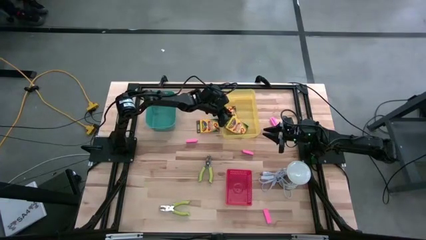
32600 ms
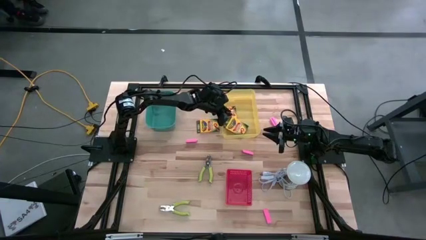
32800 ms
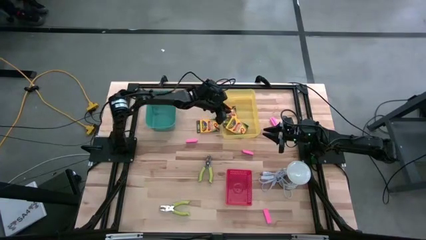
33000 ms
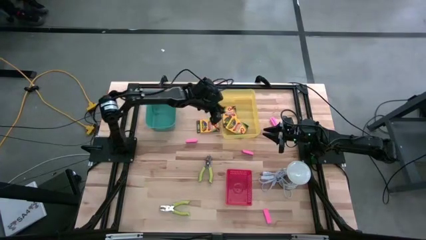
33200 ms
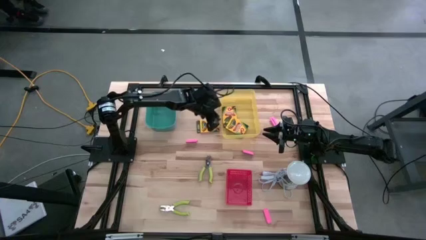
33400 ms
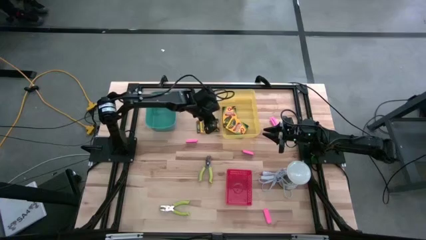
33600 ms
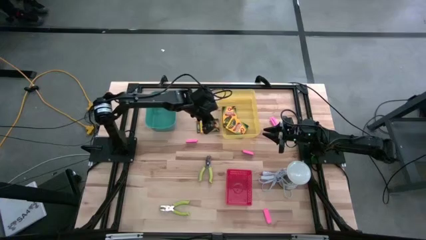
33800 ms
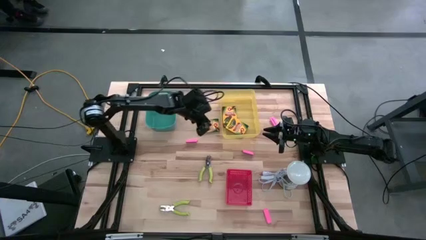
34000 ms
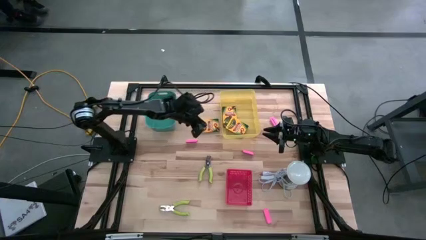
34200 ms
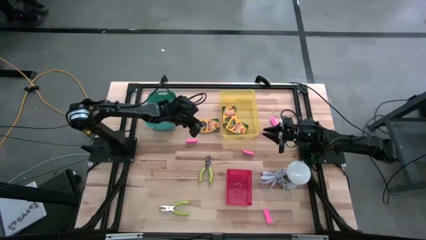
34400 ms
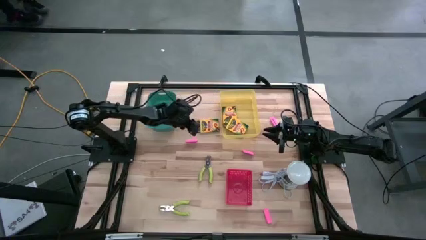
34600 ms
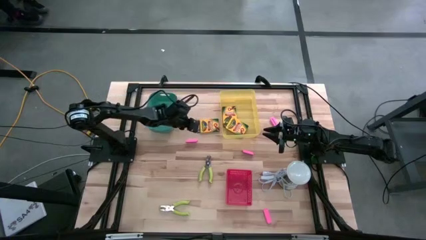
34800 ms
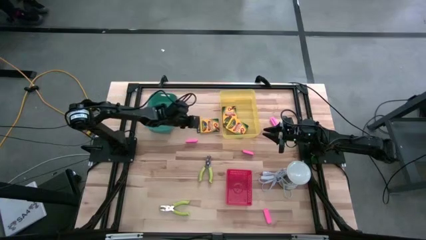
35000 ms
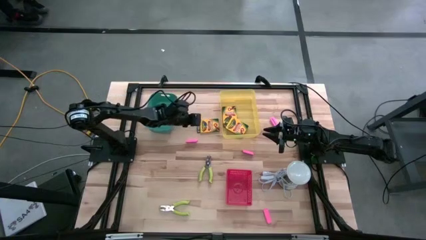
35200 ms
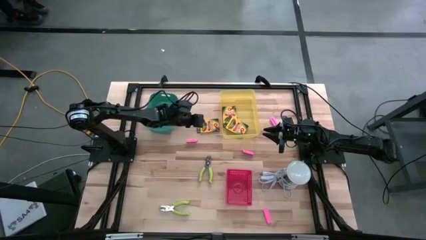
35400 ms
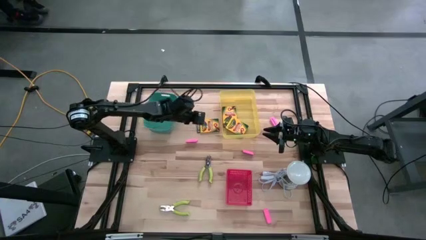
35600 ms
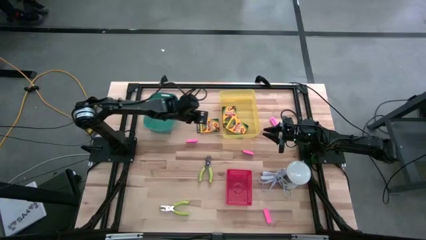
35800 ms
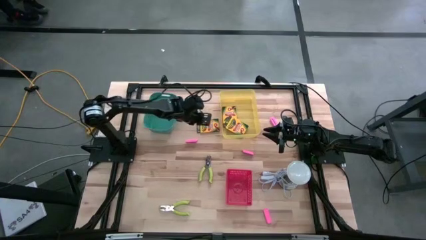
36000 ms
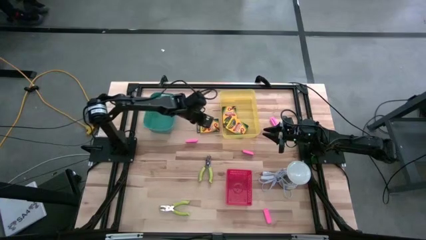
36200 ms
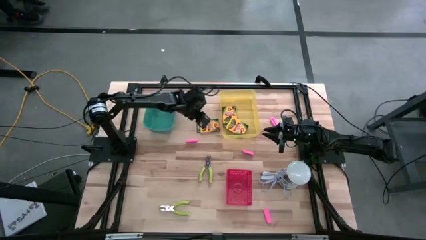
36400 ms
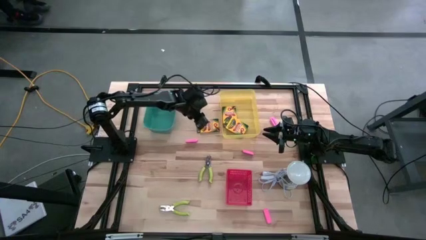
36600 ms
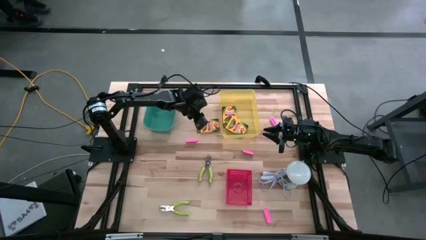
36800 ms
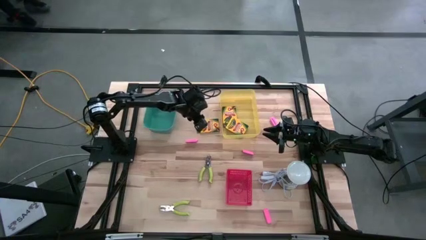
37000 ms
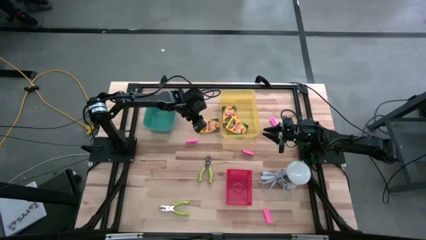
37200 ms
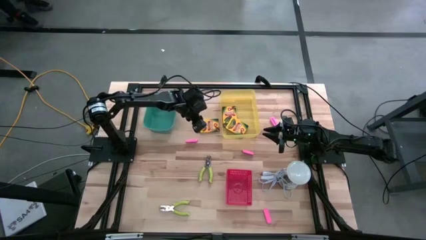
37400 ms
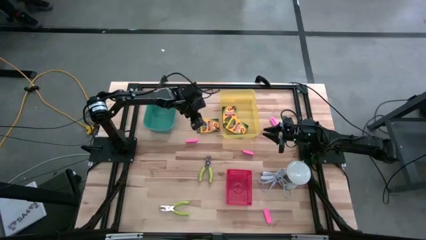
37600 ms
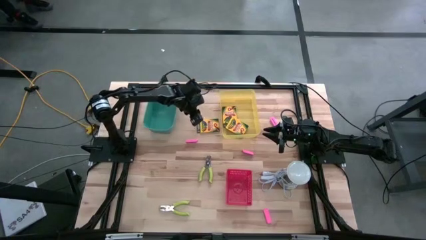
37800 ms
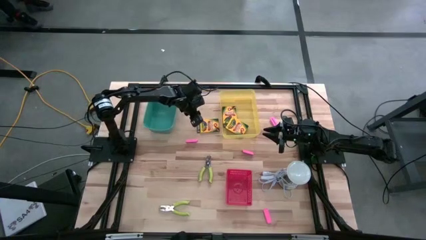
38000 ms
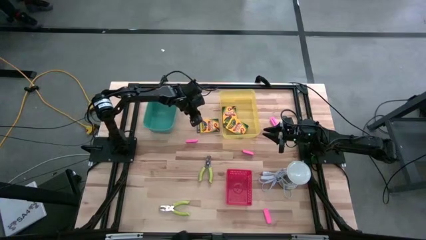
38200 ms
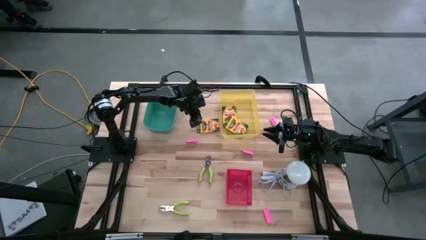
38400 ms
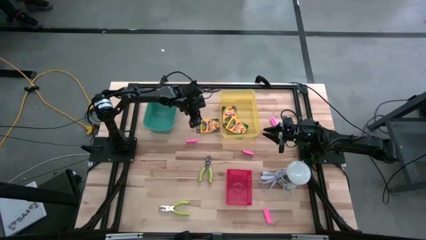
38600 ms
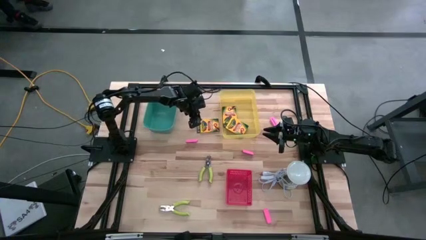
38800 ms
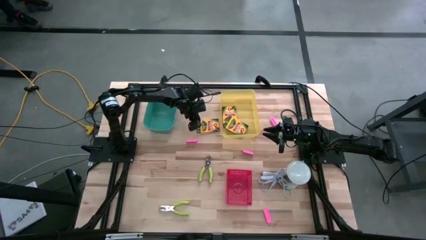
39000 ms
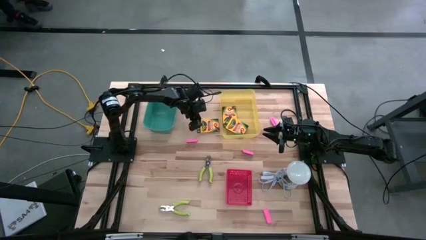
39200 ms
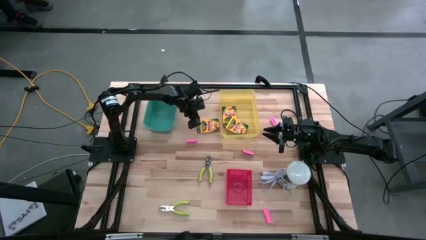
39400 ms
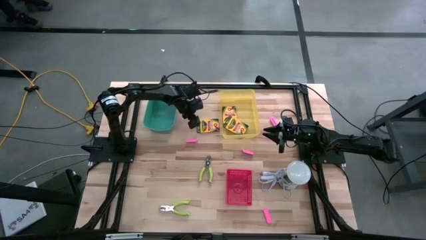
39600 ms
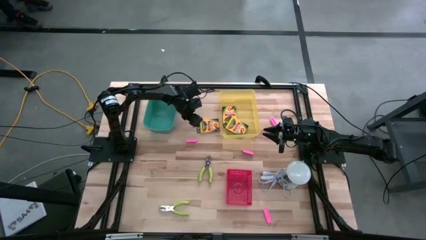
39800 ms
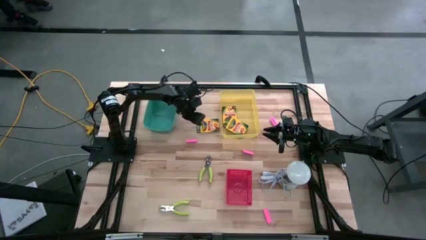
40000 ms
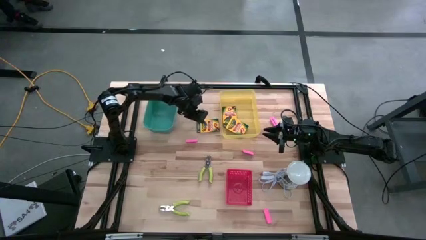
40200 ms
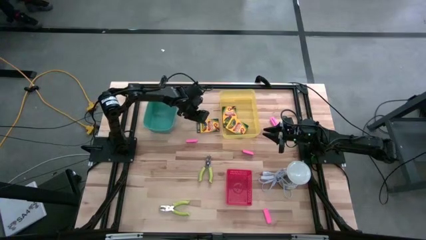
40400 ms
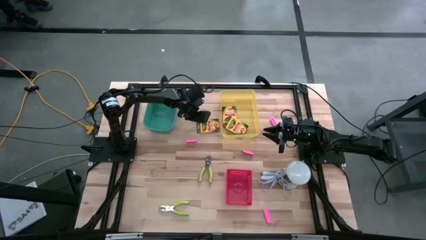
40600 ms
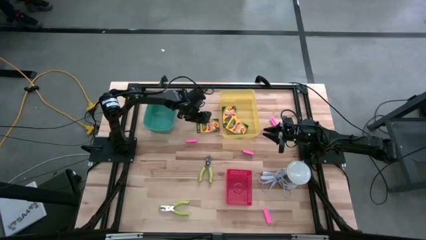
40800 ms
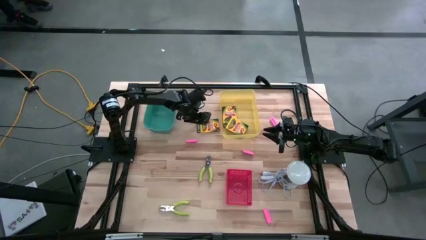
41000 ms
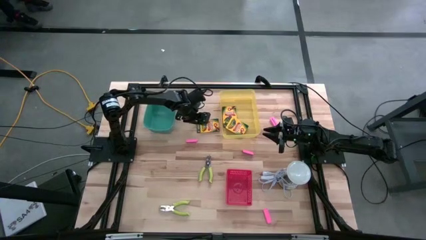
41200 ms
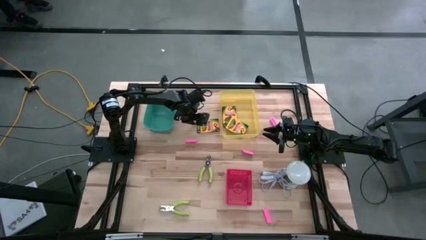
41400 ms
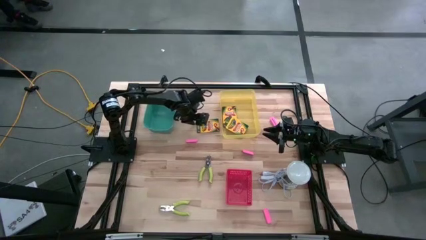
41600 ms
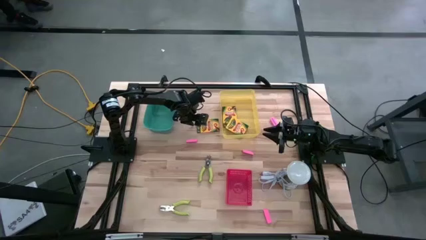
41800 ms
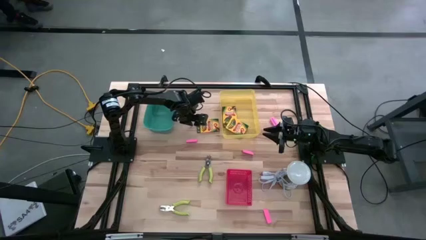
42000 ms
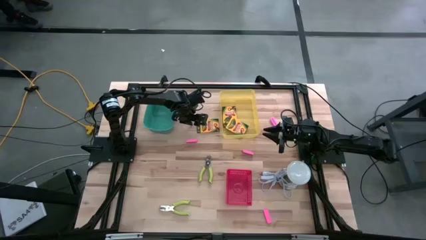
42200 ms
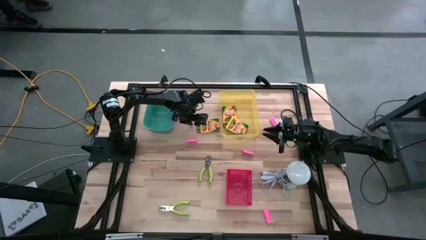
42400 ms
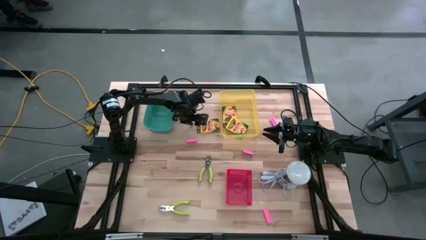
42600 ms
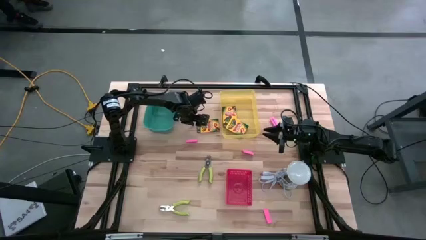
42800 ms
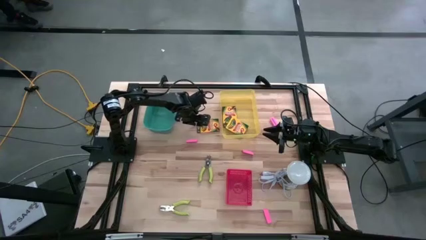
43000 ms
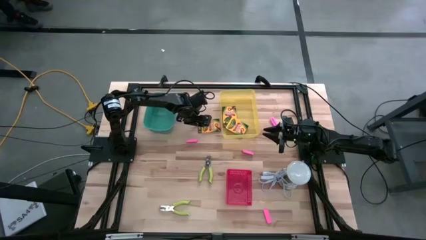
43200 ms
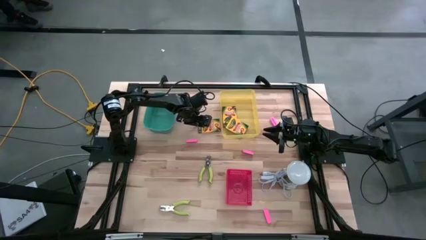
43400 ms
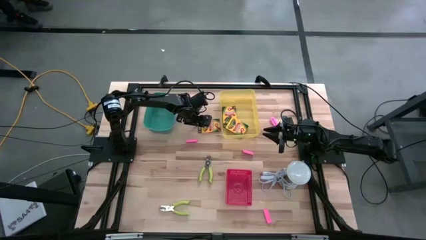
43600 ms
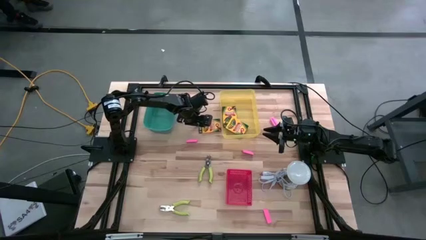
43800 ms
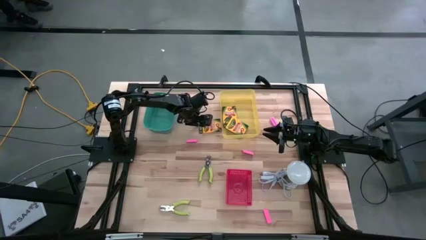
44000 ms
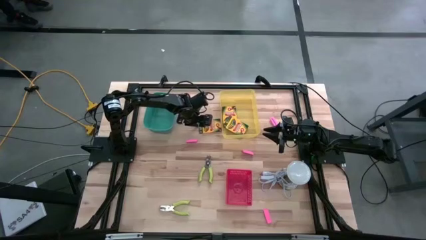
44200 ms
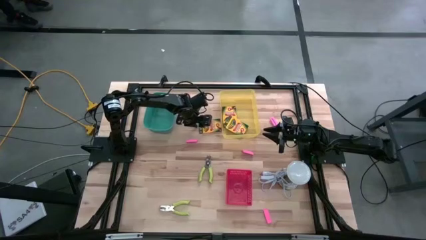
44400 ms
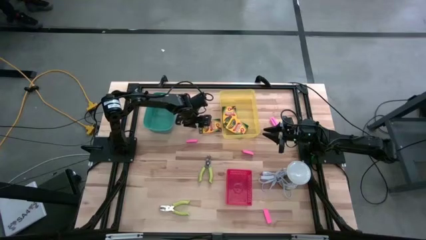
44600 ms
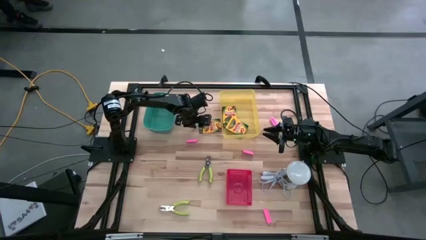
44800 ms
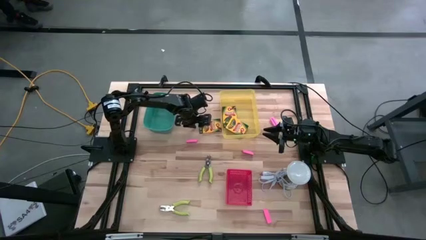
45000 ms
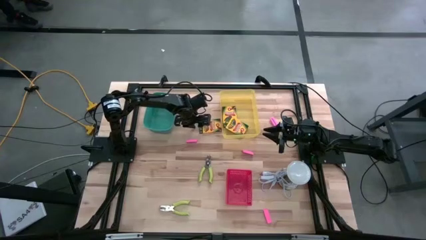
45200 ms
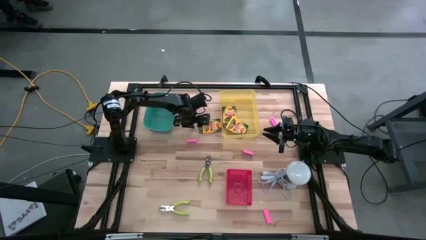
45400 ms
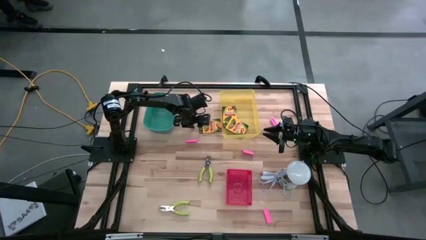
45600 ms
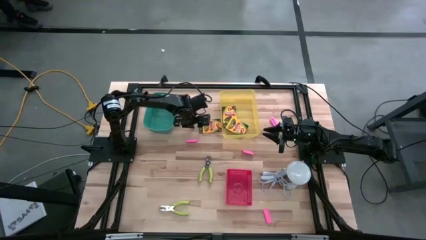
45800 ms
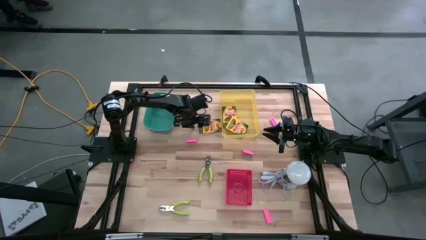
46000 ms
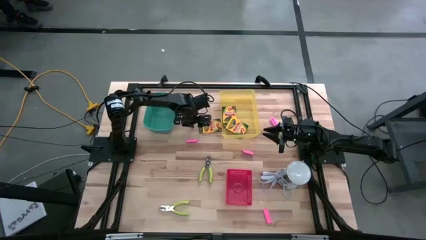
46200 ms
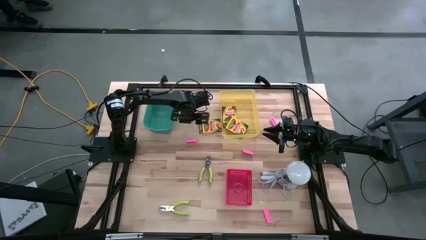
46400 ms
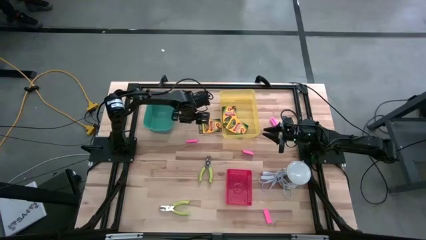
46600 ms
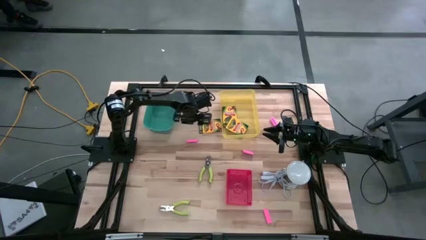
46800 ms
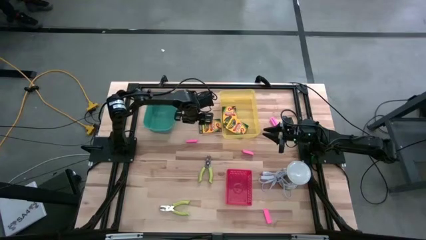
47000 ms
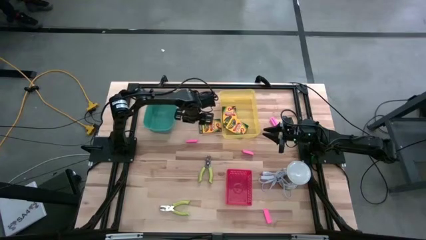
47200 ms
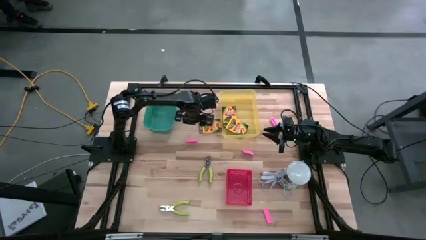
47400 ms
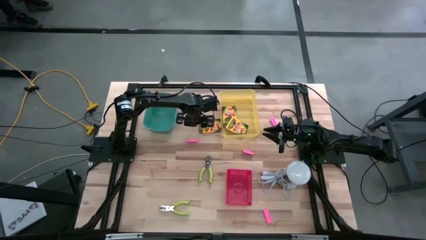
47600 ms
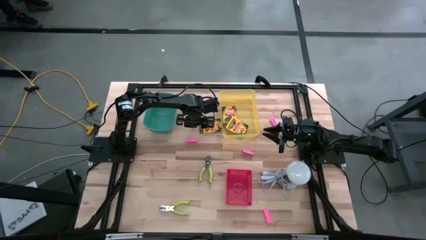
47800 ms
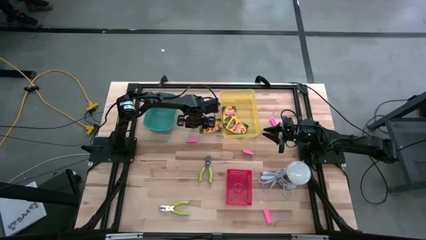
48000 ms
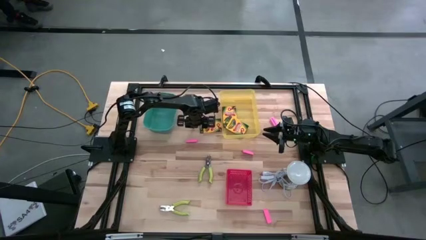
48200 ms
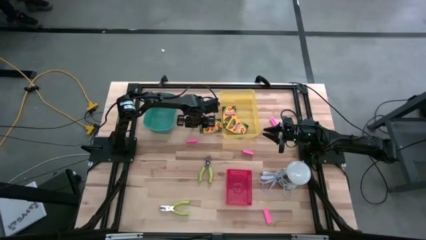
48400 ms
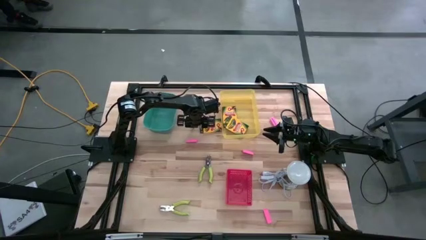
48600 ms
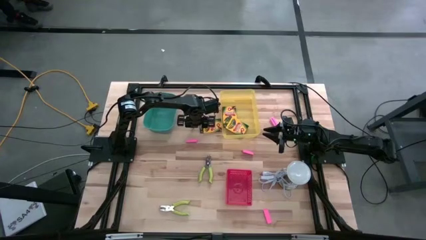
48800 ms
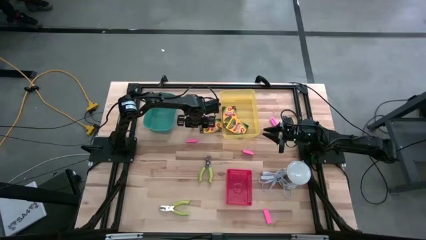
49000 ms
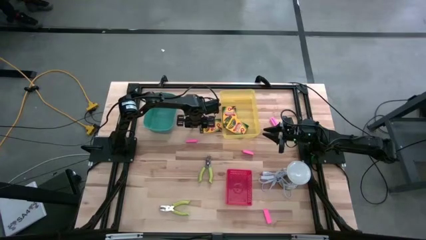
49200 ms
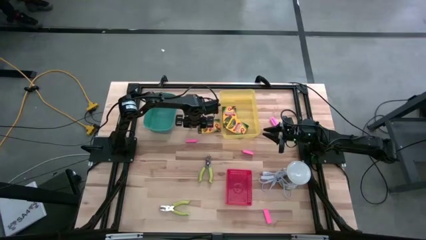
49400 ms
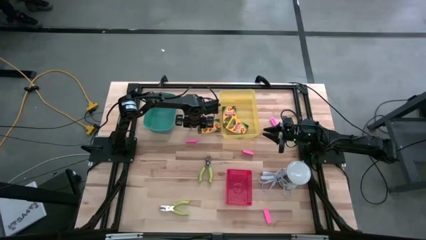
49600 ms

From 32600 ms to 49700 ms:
Task: Pick & Place School Supplies
Put the crayon box into the yellow bin
